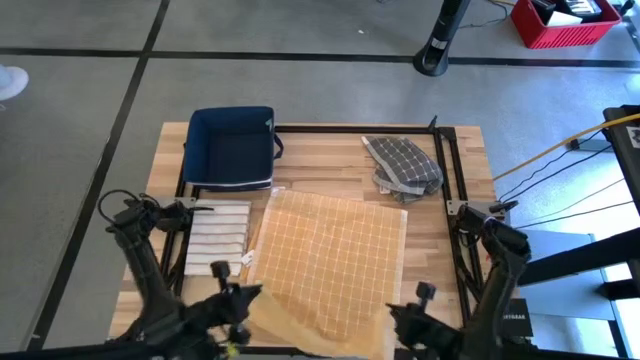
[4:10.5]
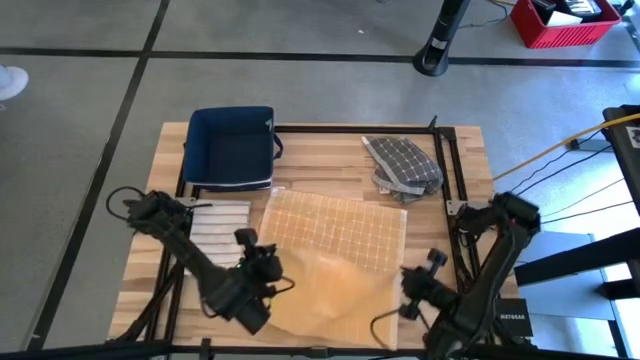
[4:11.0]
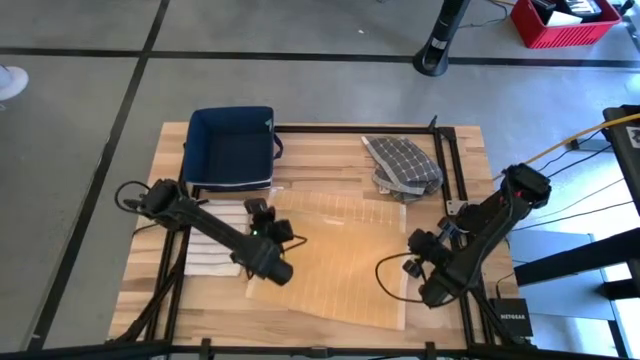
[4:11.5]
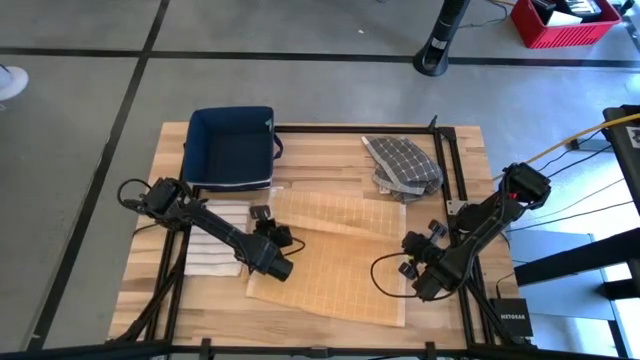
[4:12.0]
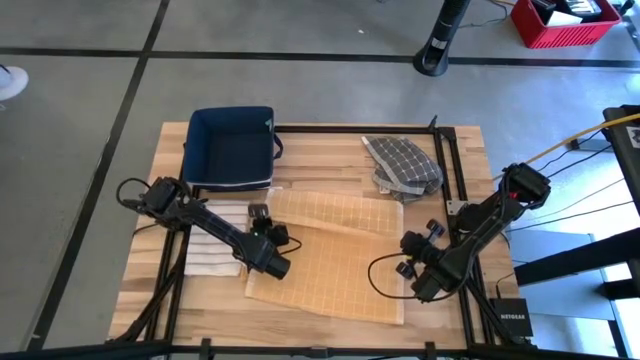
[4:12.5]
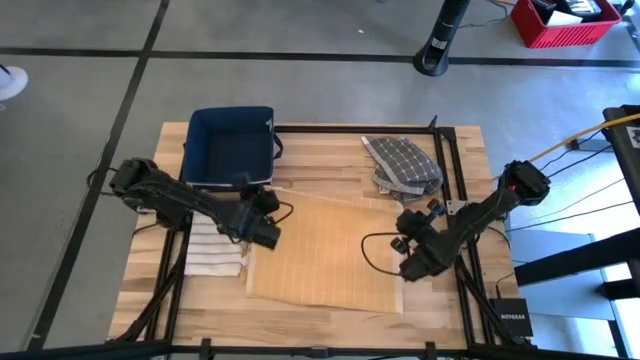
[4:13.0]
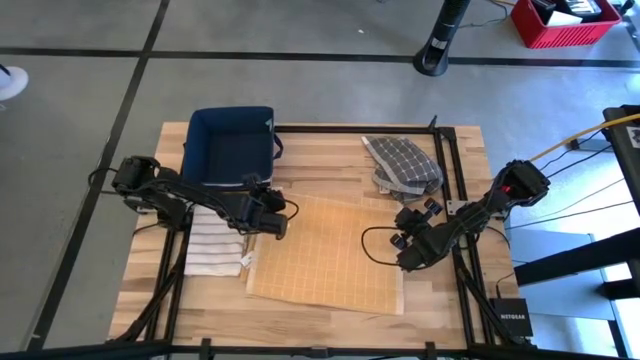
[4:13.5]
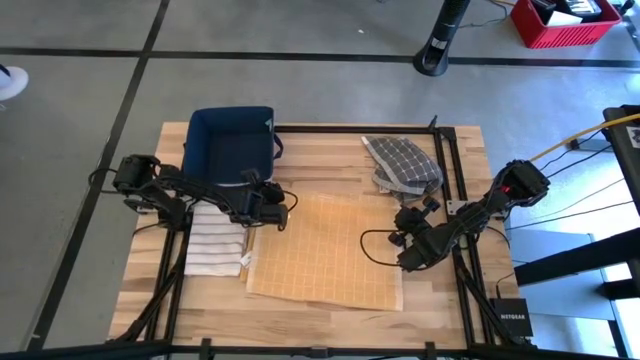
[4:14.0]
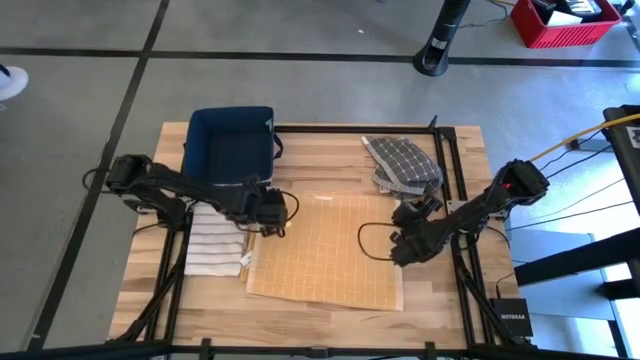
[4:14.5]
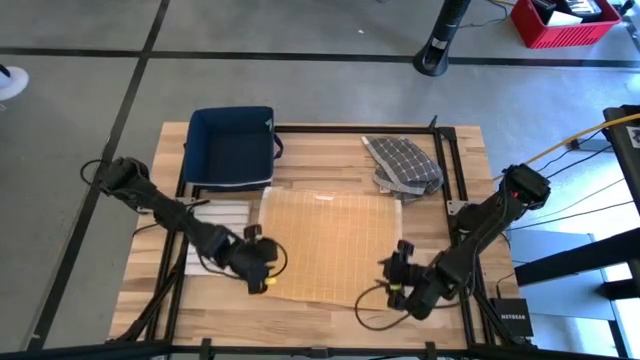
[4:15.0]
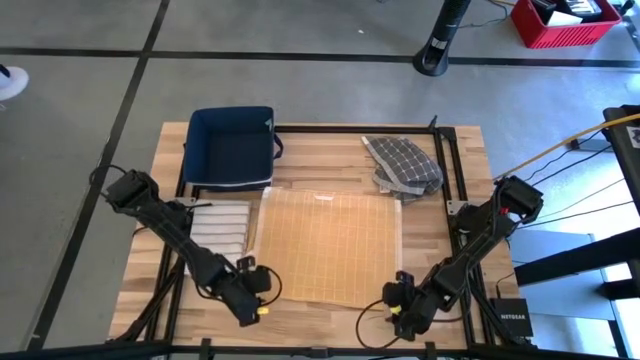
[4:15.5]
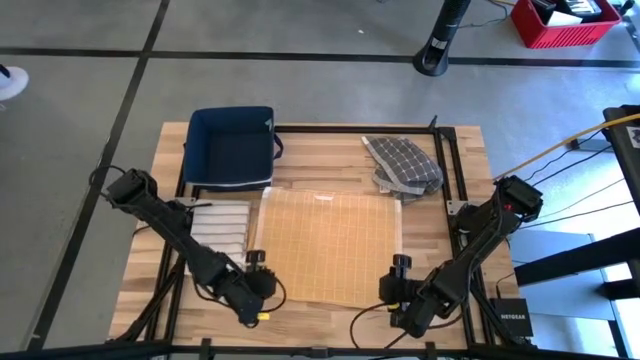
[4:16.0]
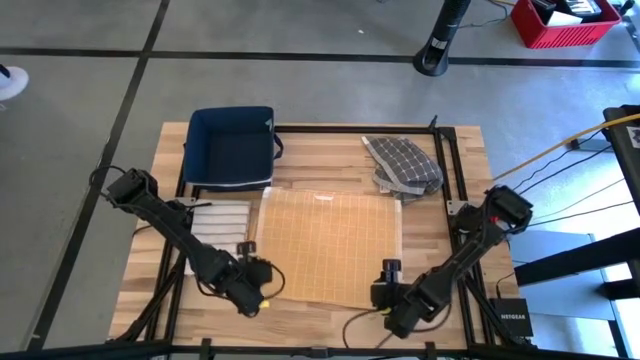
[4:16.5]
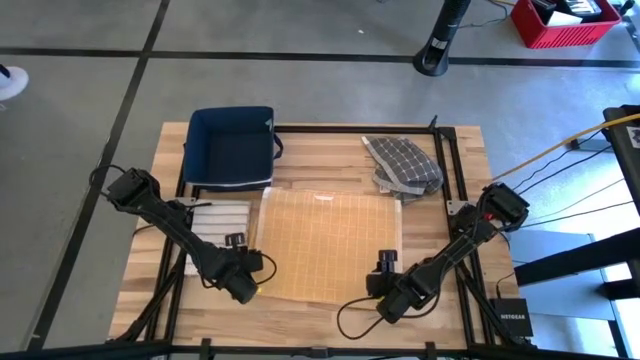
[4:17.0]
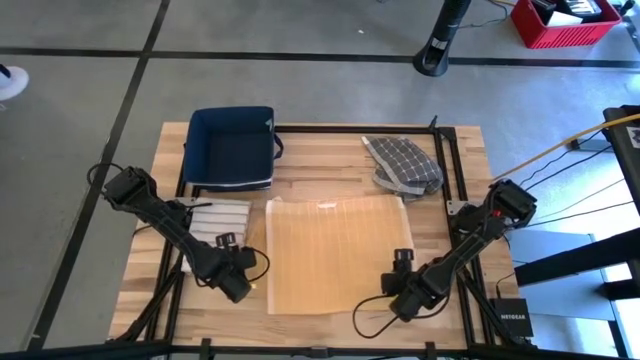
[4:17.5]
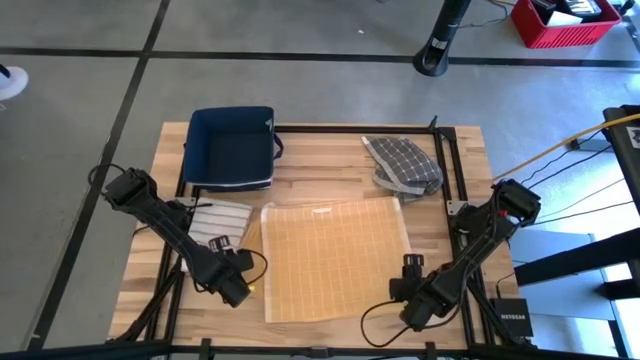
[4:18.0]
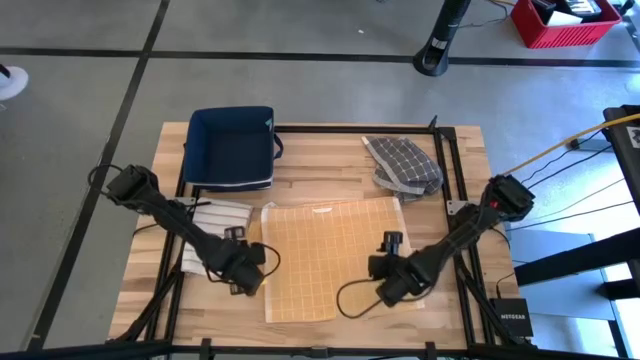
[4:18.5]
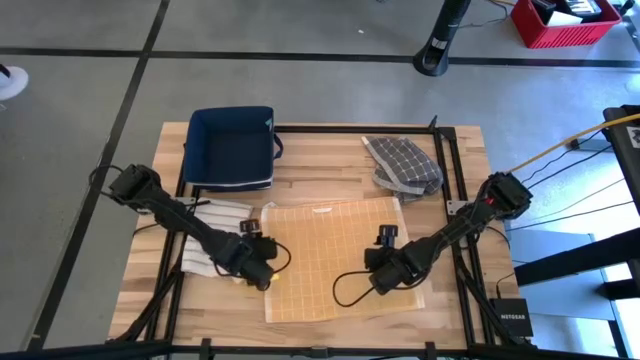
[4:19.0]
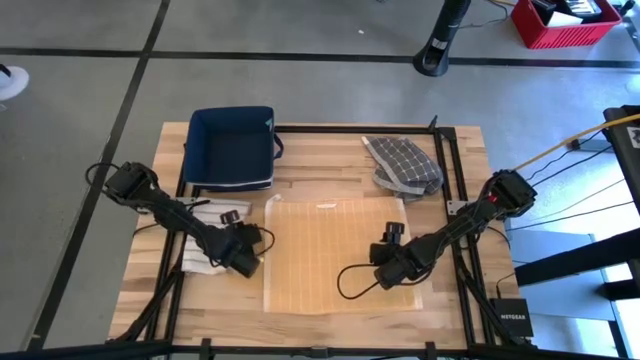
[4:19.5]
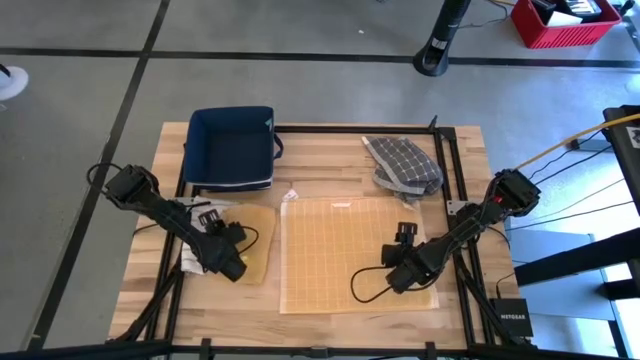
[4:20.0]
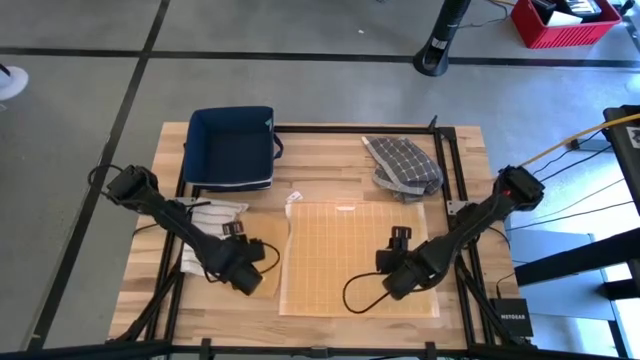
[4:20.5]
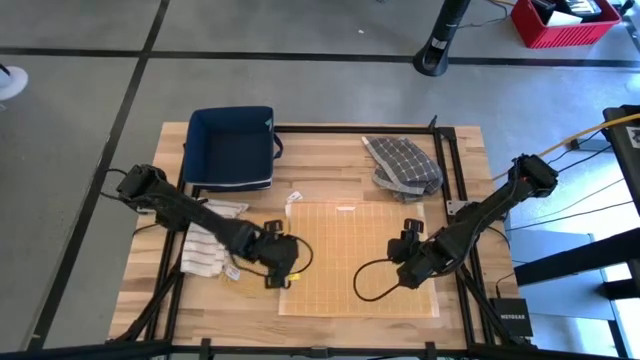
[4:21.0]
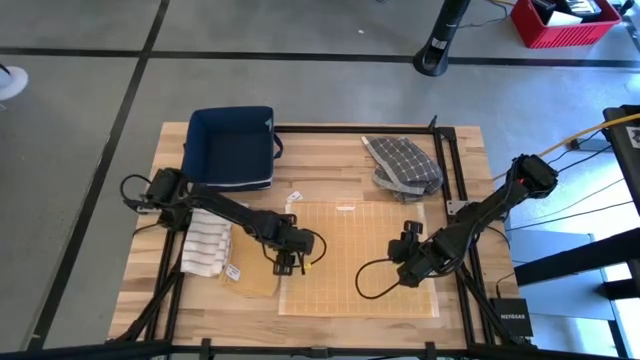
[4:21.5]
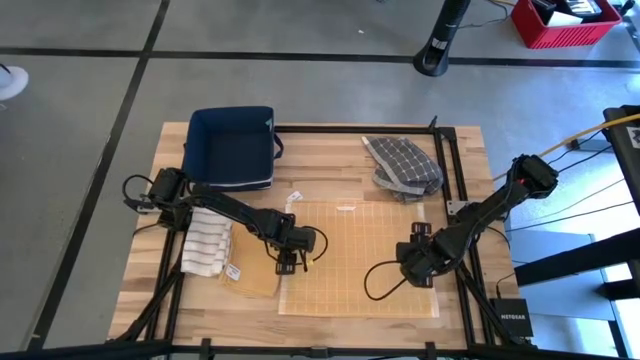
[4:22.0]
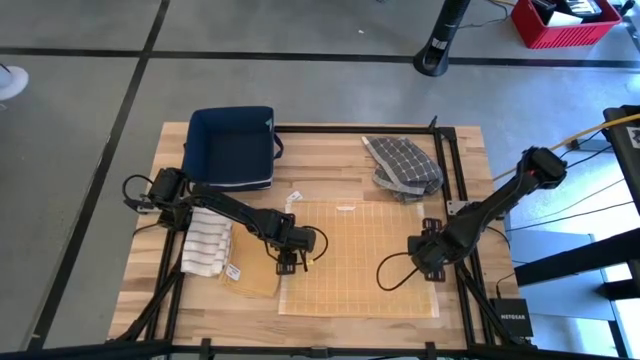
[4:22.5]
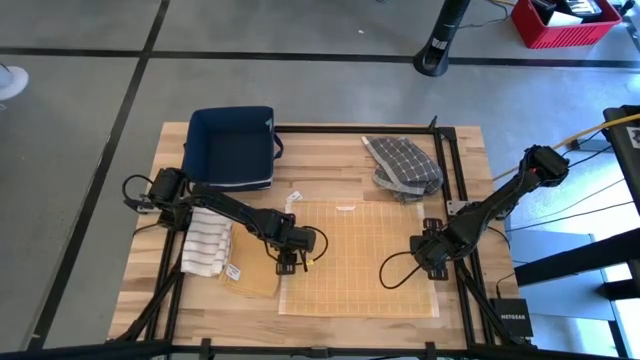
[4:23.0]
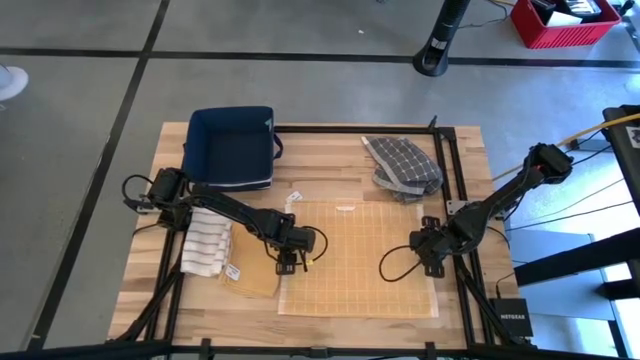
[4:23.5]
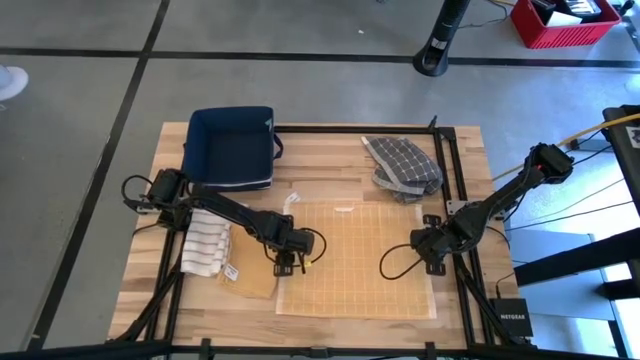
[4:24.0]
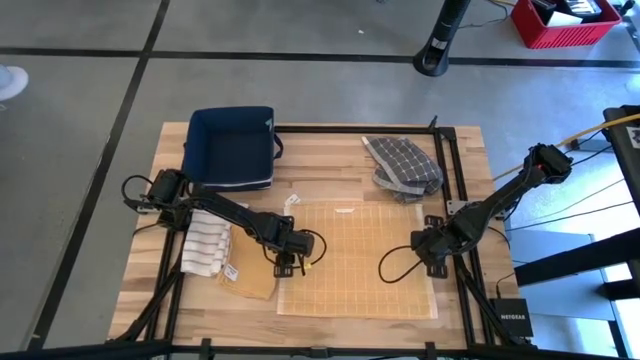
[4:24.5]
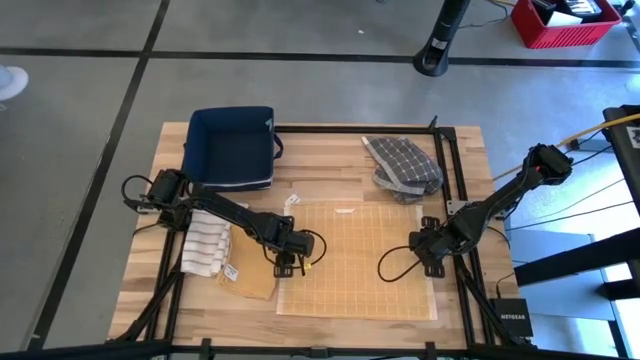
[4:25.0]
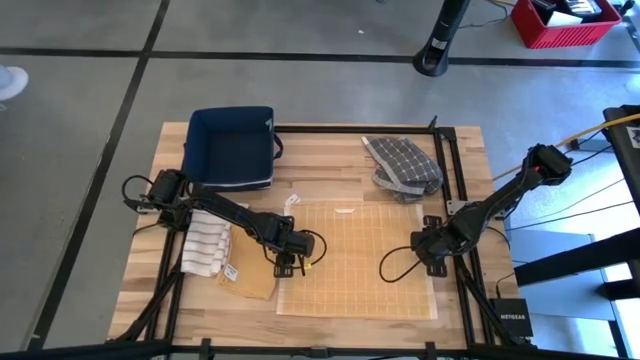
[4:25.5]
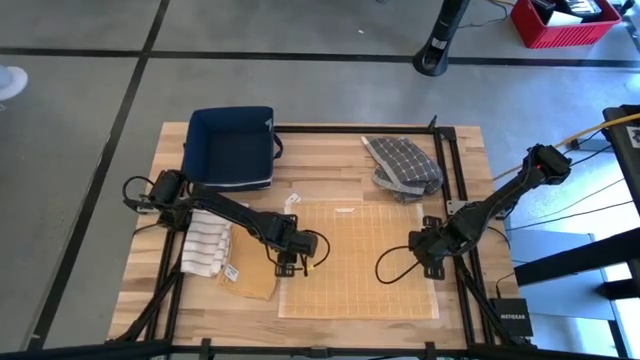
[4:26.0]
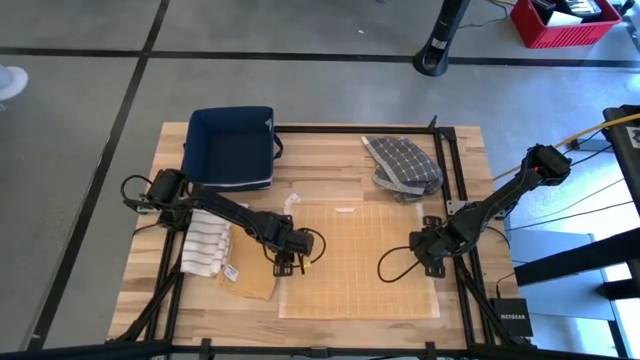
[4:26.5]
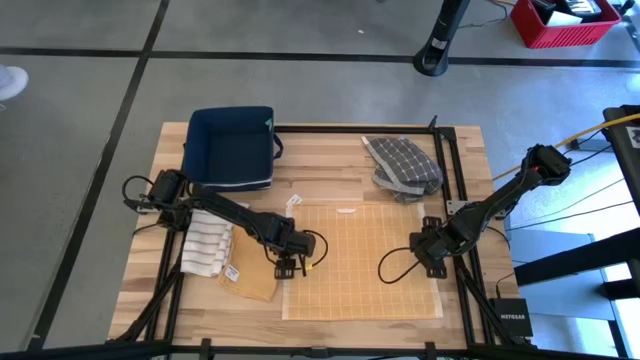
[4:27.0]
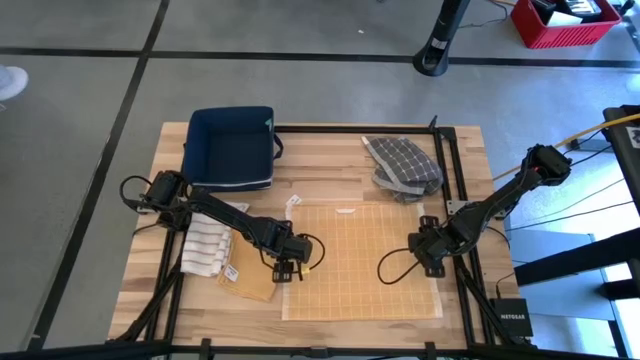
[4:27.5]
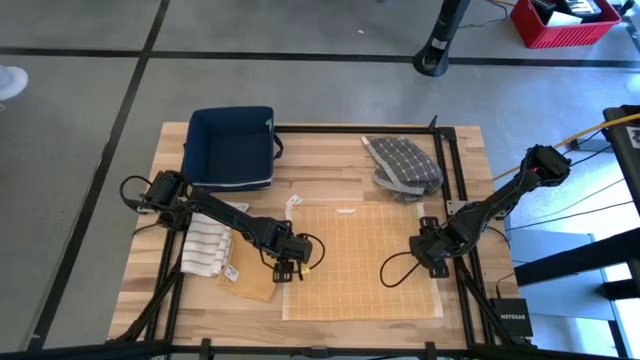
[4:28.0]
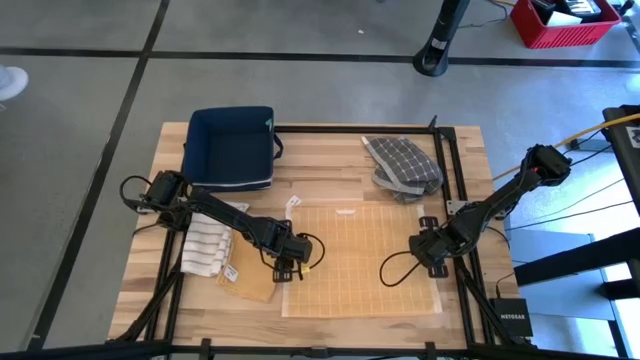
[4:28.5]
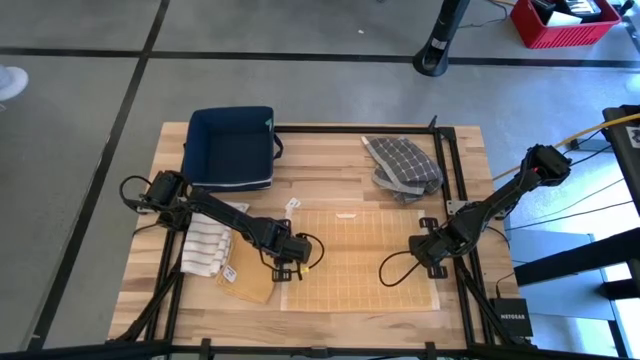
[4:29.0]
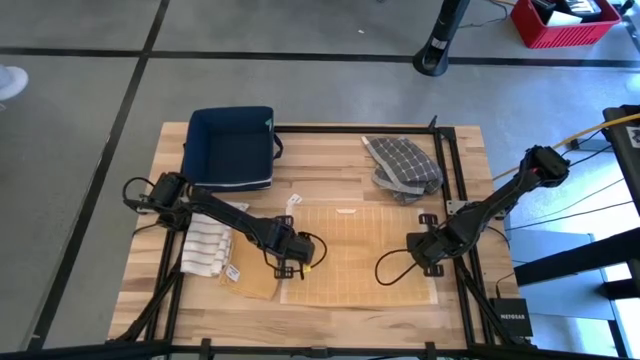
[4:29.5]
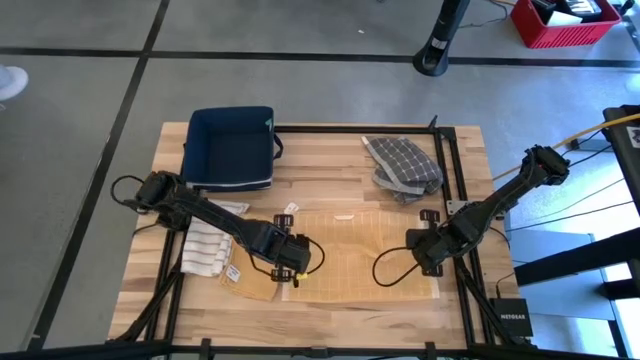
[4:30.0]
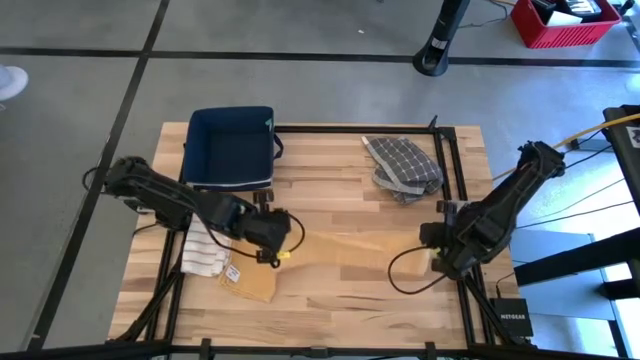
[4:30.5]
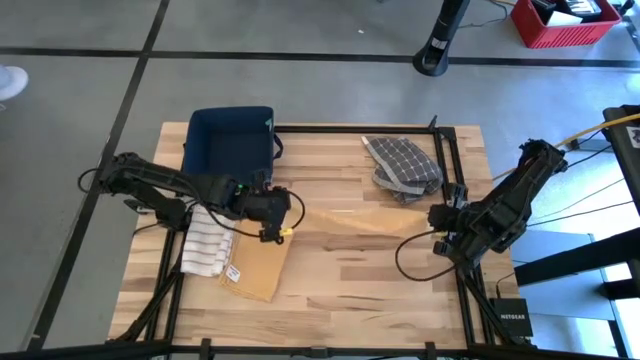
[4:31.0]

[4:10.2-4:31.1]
Task: Fold towel
Fold the orange pattern towel
